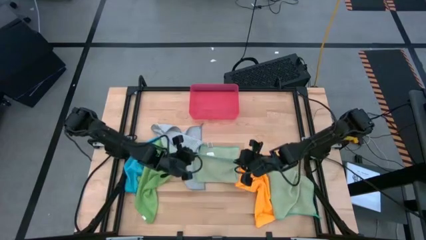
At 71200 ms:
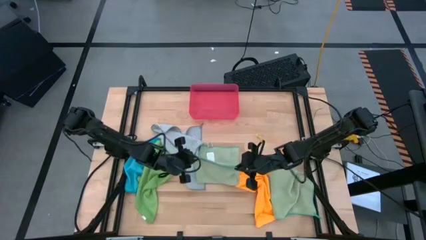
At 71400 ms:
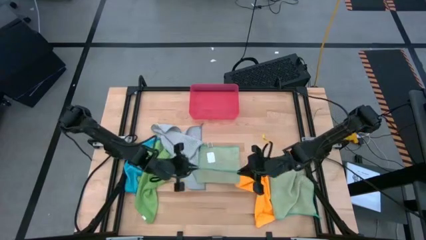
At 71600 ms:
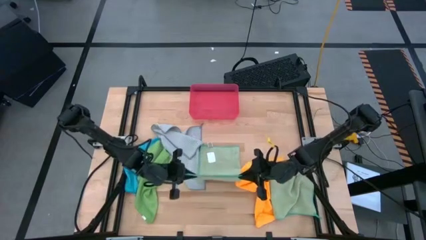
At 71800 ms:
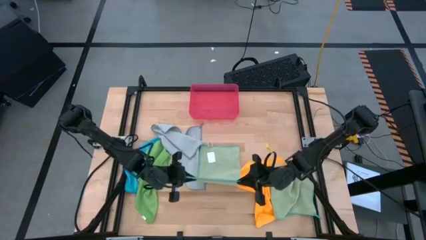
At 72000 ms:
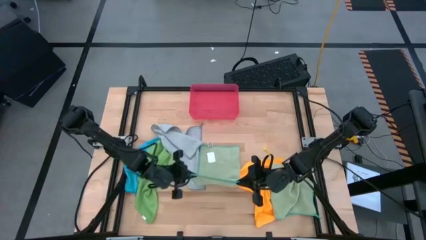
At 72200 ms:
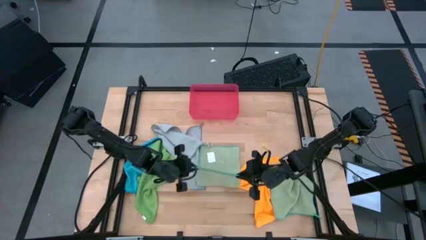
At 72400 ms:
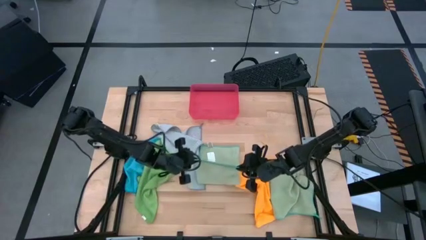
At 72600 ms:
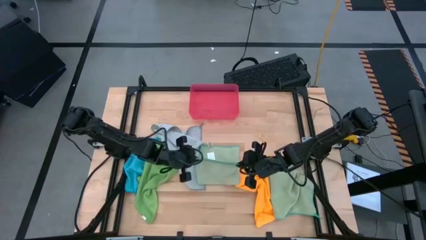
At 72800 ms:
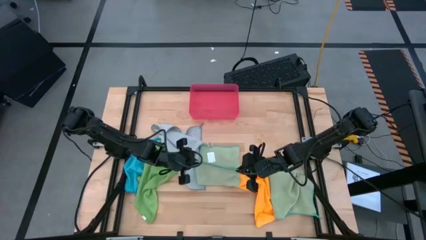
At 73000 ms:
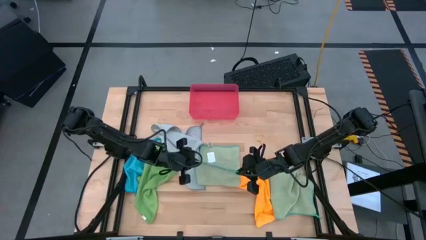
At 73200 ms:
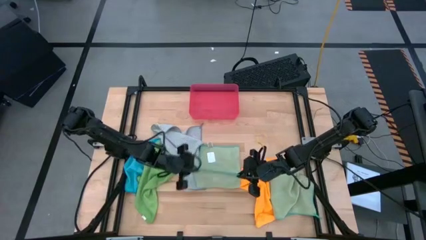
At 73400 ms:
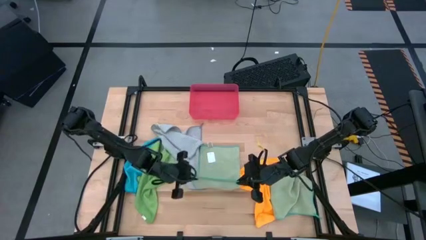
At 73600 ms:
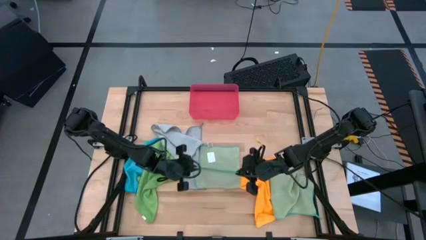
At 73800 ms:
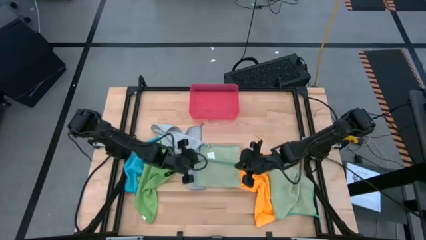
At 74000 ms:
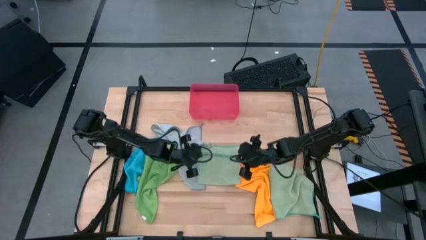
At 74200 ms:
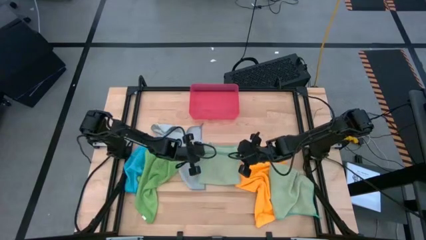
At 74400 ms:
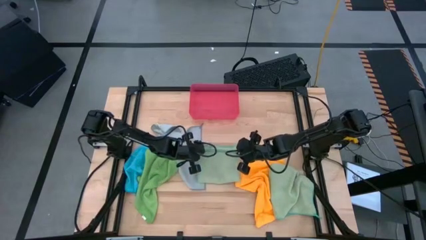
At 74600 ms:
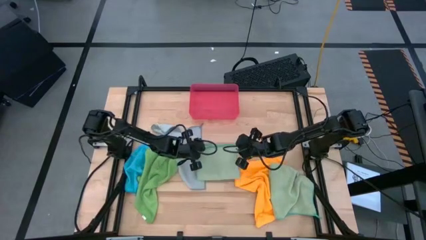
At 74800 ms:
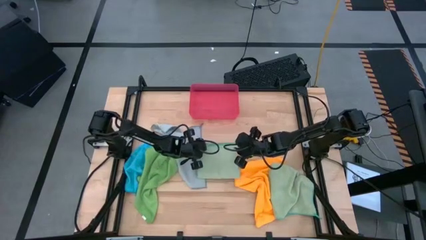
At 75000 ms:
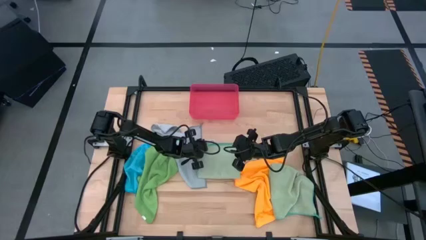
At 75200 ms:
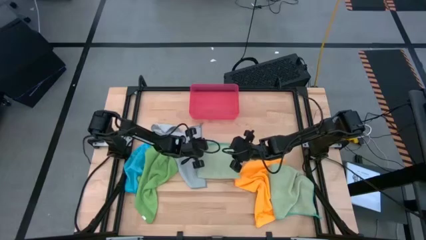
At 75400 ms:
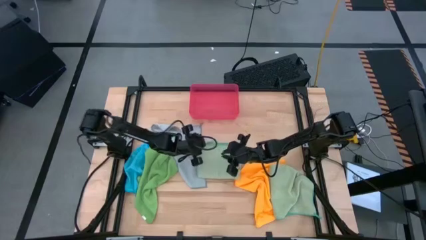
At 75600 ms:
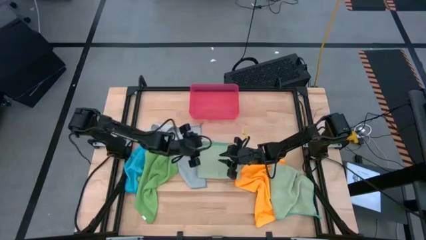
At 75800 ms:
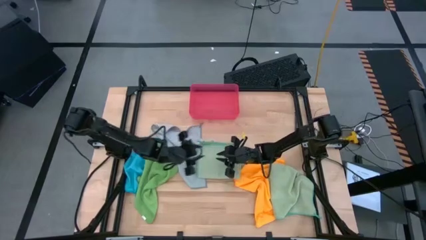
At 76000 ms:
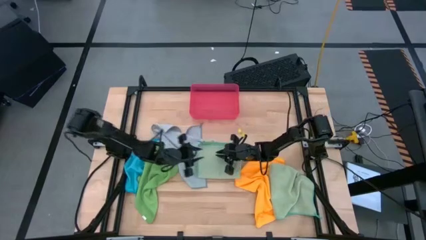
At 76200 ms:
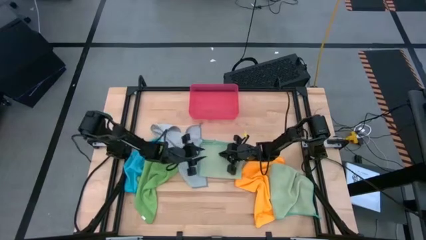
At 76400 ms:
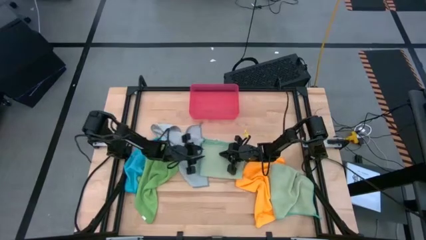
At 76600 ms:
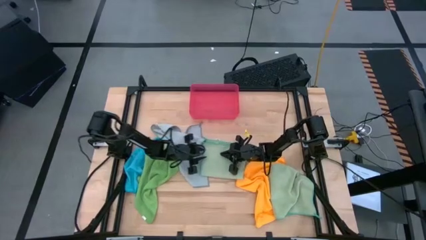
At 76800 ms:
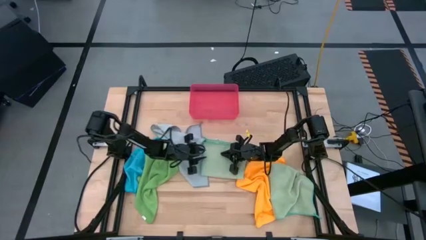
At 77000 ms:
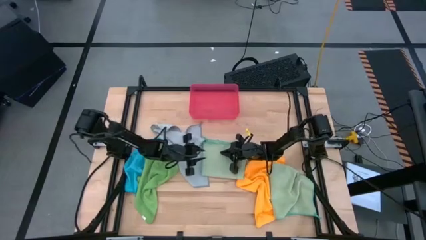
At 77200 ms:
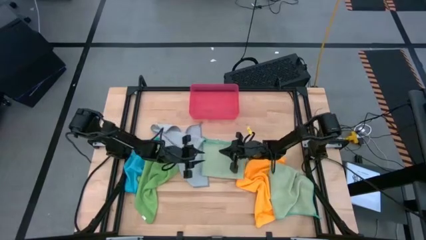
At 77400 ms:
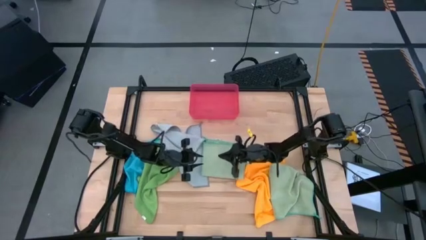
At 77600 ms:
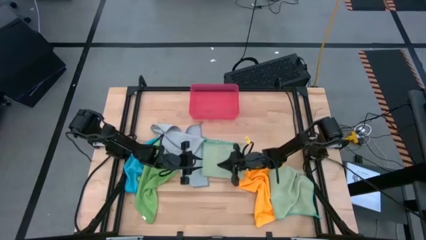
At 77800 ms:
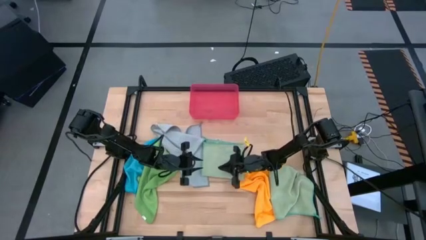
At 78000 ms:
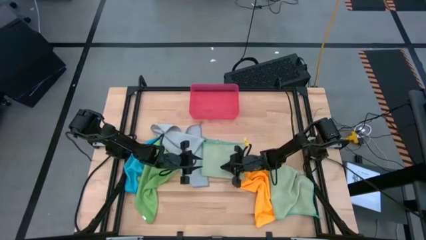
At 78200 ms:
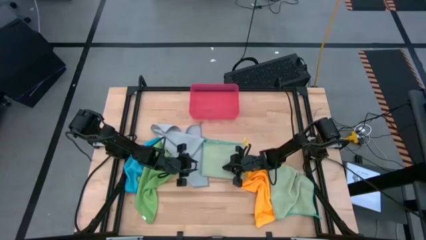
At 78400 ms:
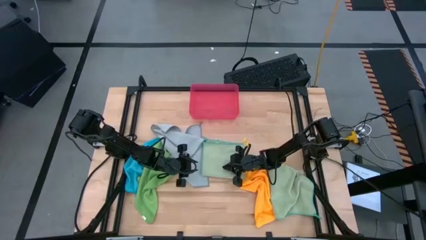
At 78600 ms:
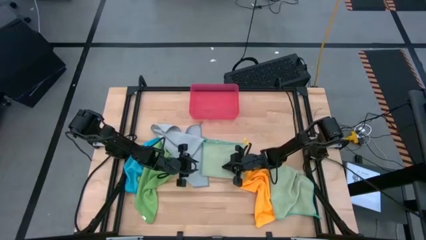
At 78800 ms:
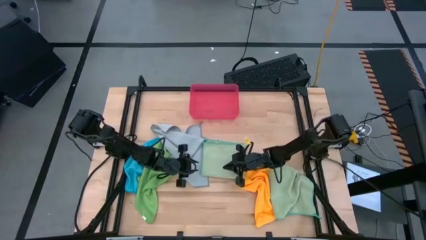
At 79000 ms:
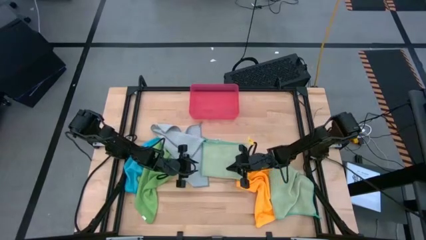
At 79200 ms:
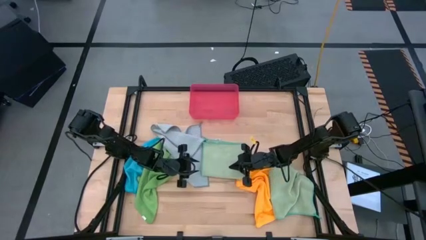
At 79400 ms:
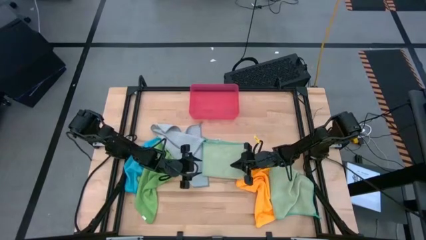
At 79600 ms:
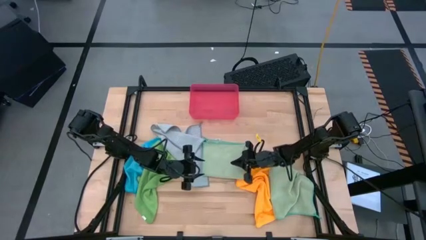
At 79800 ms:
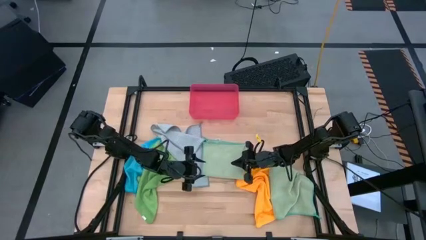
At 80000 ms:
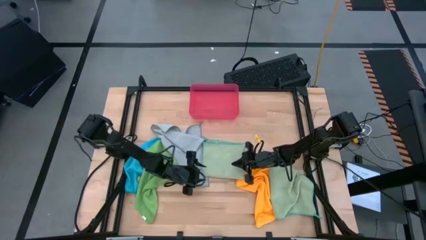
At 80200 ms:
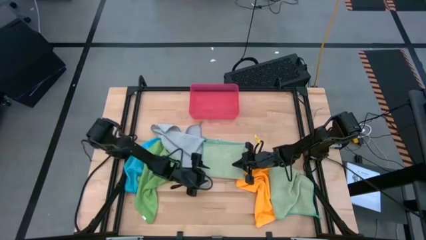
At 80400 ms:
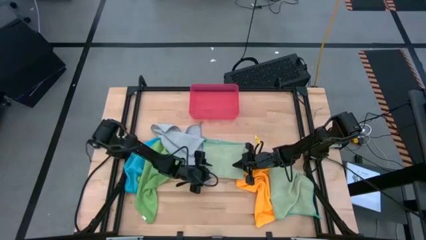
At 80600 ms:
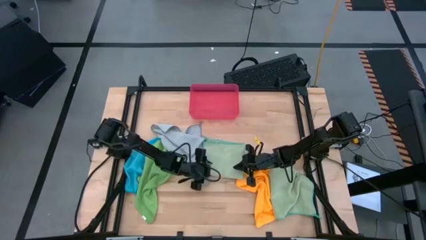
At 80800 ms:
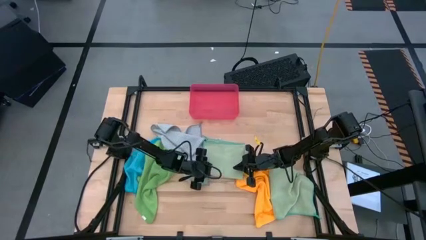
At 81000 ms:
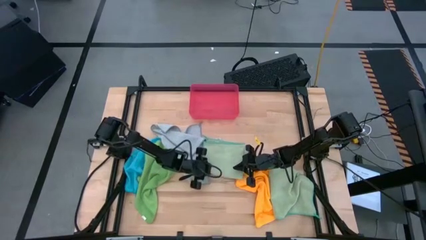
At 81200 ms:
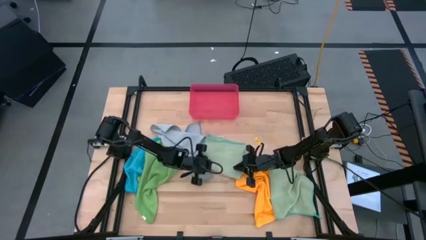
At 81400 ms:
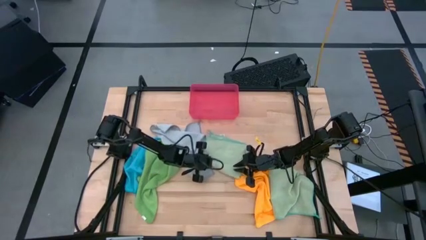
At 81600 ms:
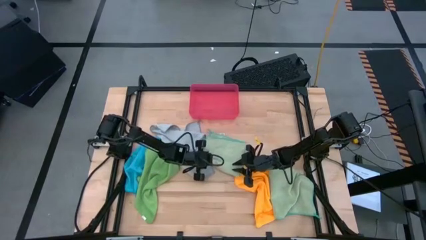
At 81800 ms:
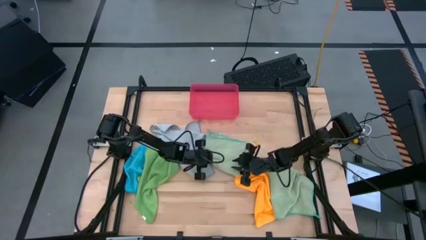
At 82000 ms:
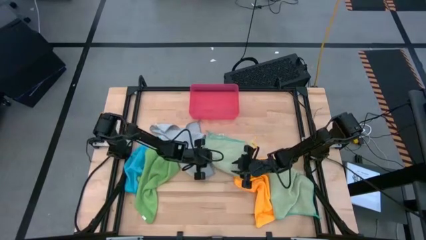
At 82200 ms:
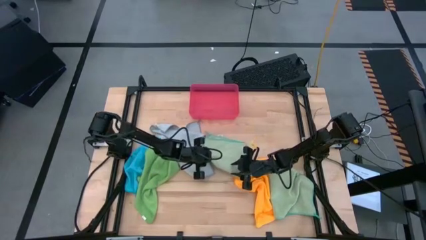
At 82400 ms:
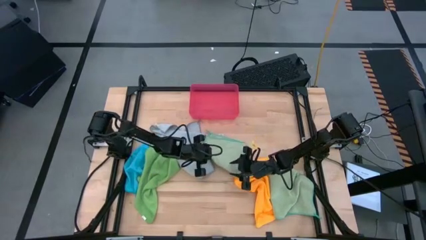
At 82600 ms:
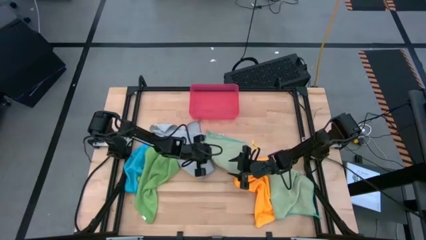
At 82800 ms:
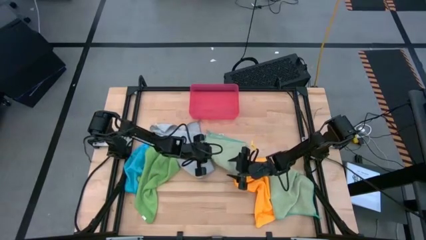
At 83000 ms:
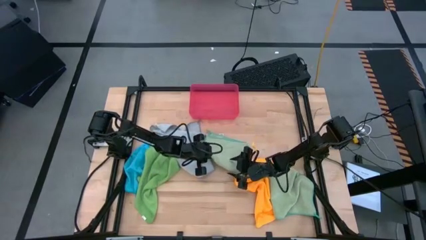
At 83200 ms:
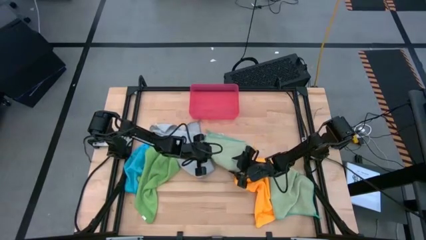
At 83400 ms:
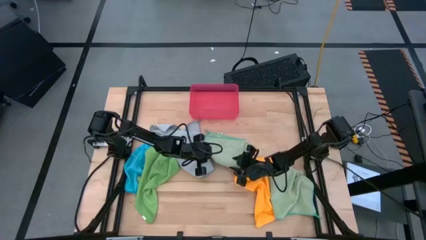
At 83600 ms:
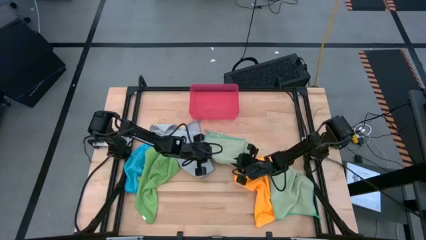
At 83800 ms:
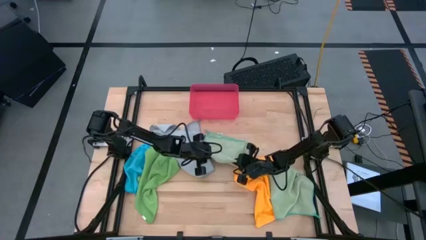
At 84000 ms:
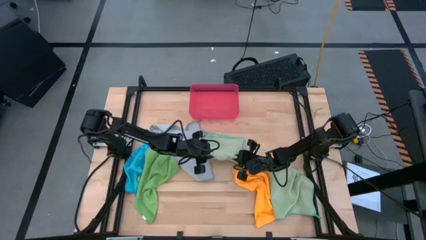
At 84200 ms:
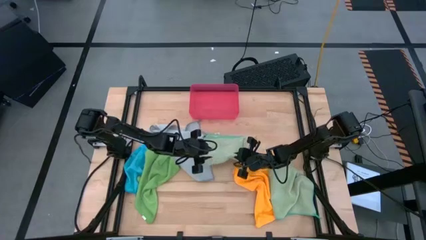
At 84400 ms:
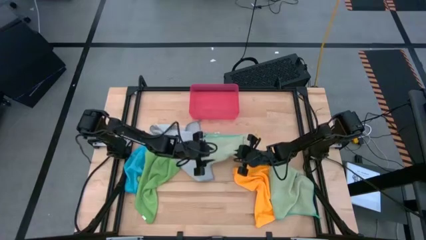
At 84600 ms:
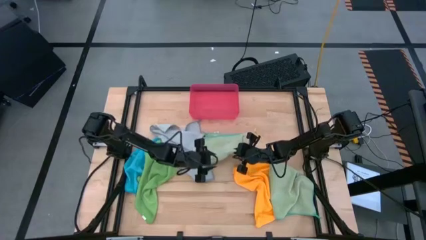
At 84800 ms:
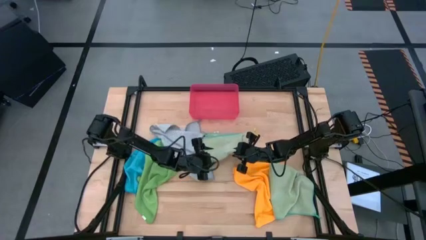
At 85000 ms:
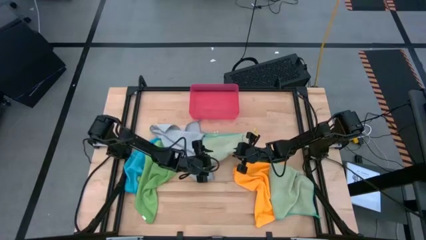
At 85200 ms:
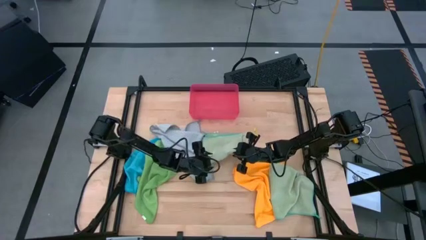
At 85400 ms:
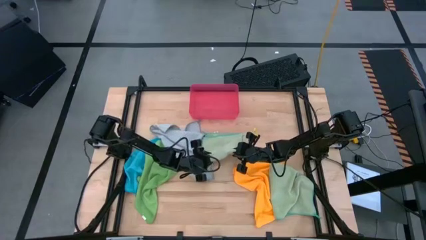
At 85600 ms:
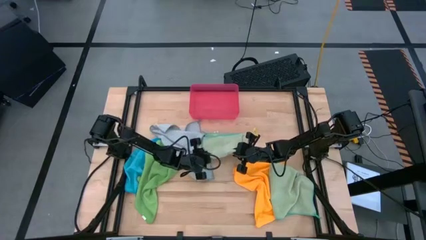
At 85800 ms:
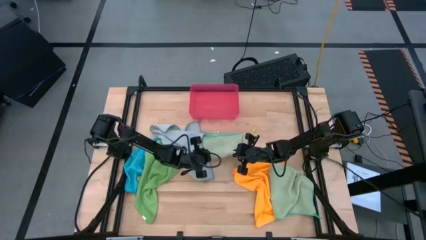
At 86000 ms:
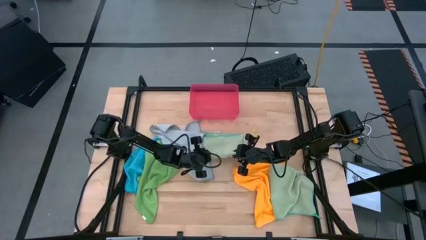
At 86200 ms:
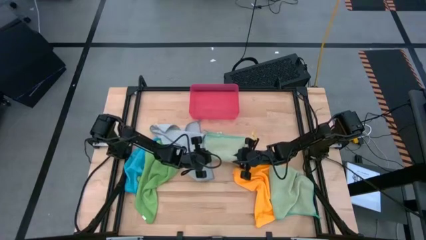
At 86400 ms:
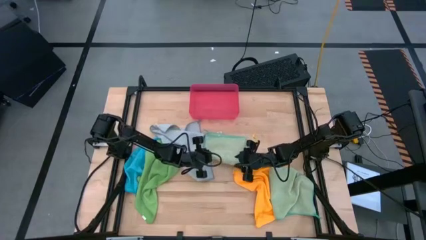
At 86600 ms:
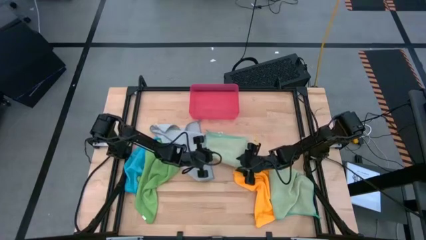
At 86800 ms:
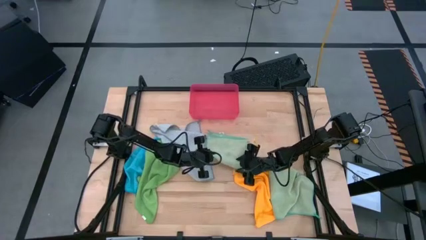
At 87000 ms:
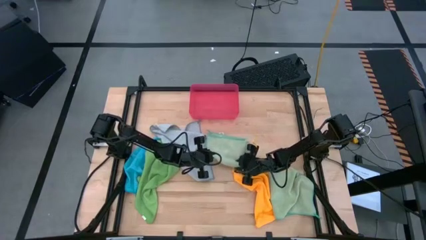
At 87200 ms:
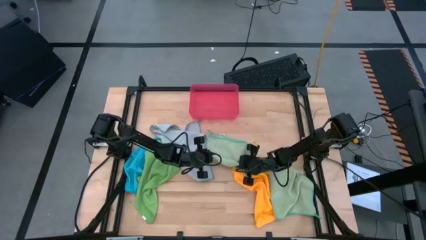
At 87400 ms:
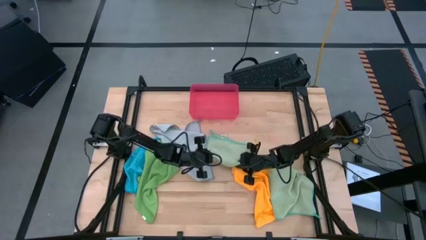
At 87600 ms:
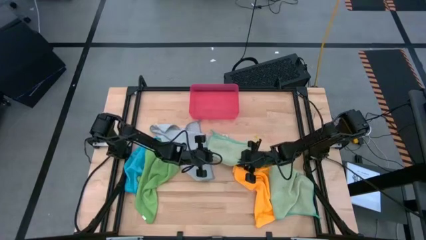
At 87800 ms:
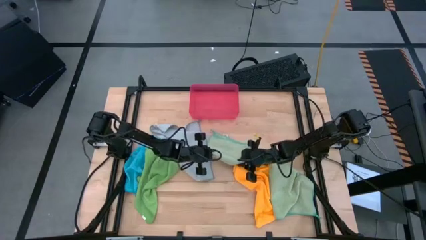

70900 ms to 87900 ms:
Task: Fold microfiber towels
Fold the top light green towel
